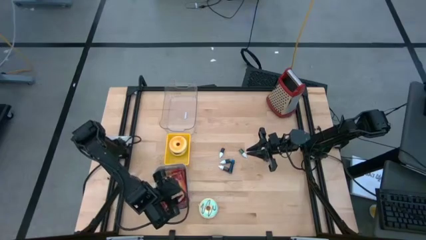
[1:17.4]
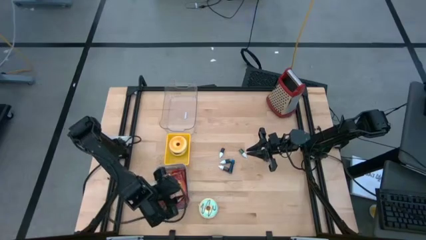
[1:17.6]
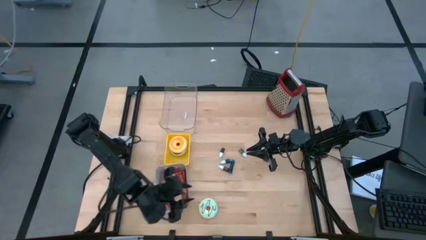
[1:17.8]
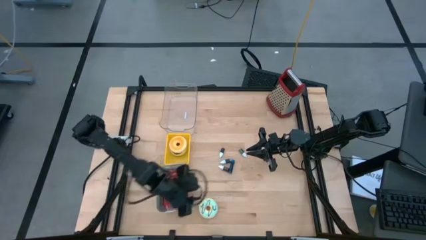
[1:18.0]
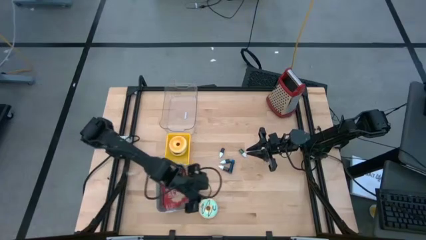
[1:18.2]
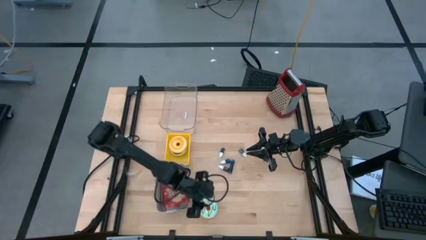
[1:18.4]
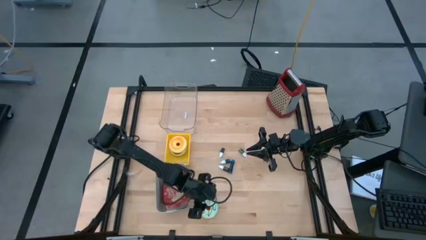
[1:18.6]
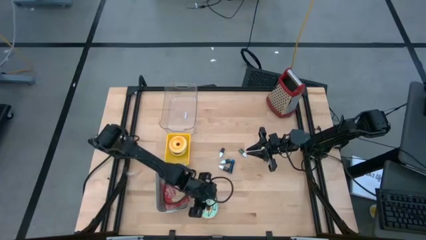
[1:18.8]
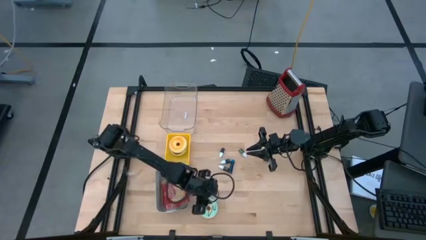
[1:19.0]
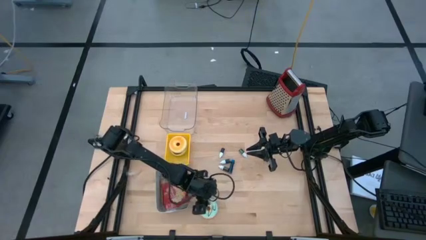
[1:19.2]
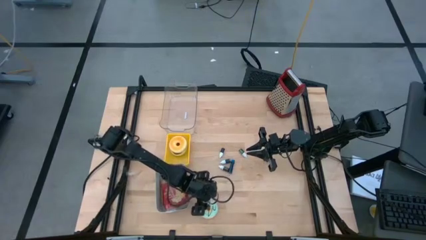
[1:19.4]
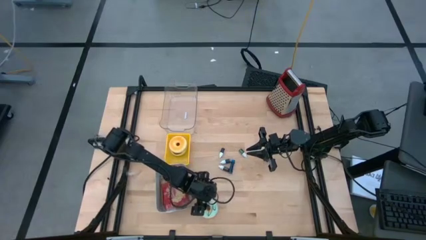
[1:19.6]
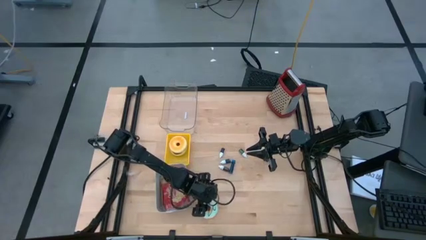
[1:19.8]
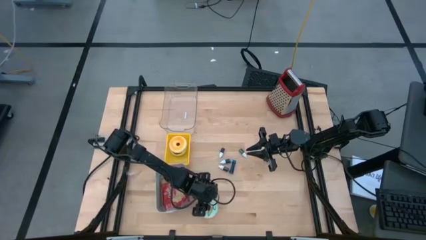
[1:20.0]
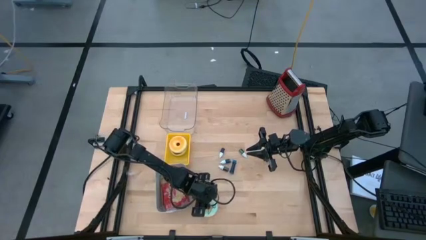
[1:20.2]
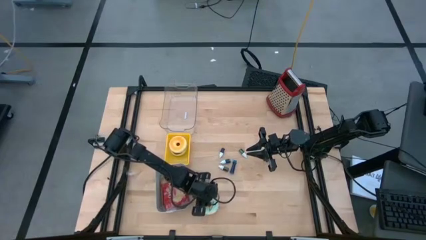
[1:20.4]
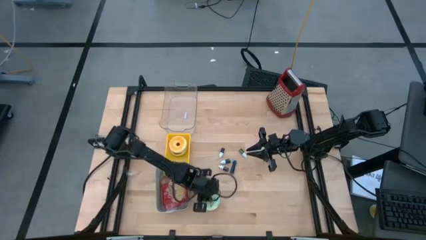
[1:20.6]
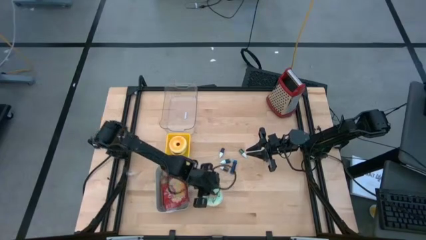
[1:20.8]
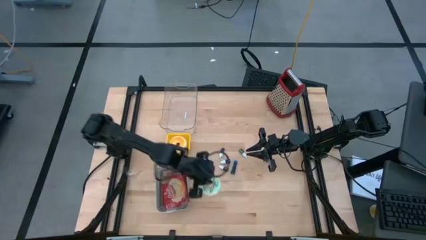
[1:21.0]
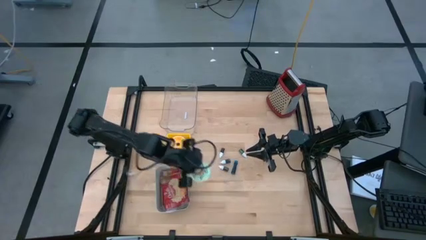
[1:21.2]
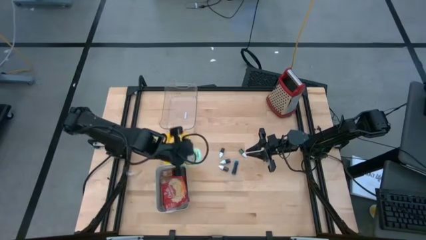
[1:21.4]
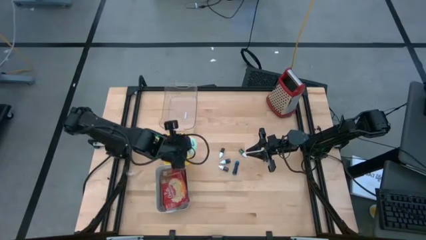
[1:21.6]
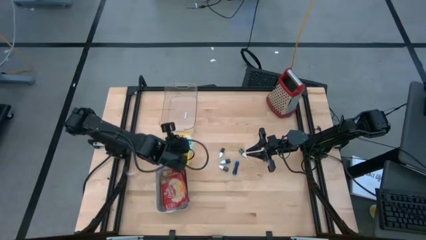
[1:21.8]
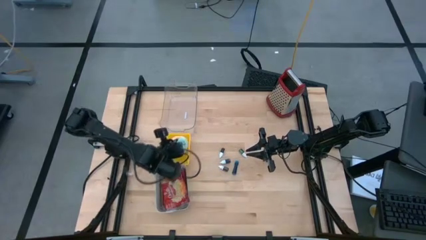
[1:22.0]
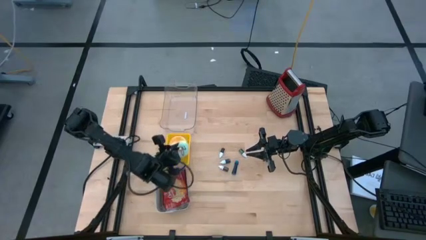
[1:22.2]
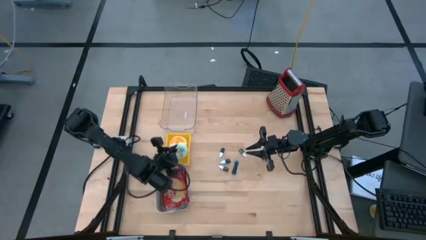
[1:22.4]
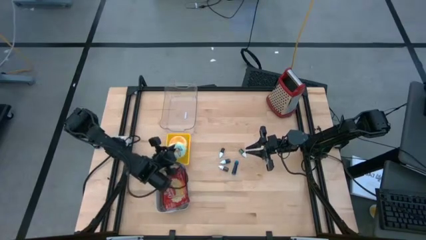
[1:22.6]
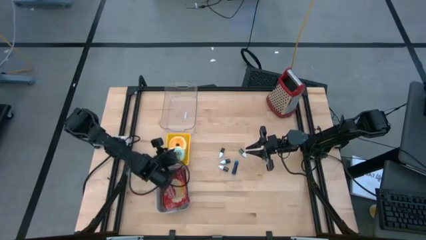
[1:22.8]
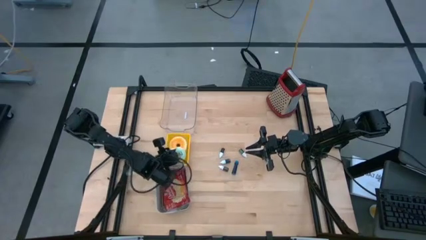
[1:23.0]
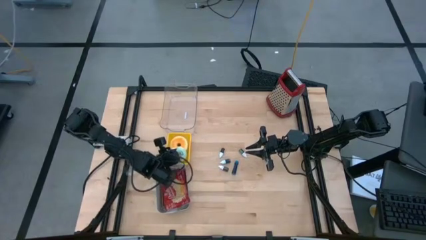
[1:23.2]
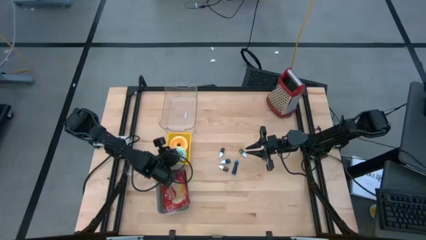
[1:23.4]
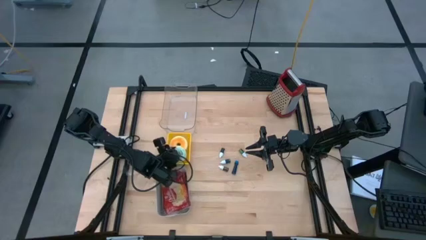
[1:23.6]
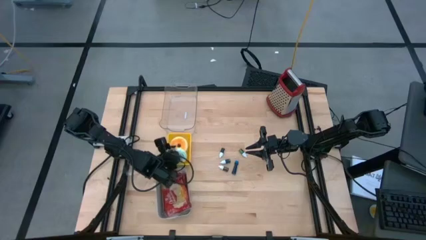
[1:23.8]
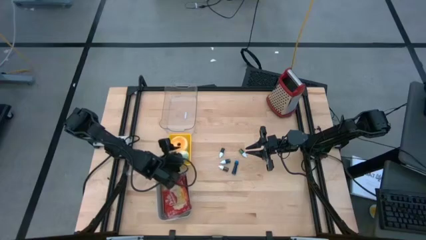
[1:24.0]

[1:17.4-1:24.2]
Task: Pick & Place Food Item
Put the light blue donut into the yellow bin

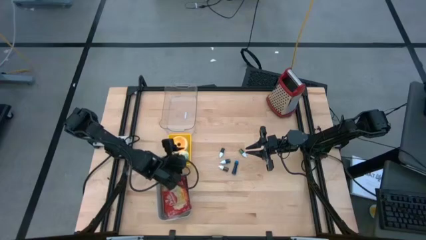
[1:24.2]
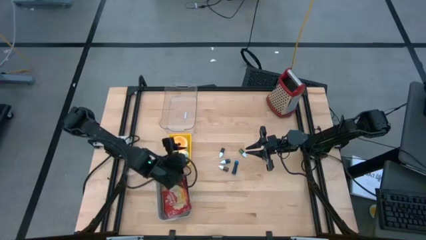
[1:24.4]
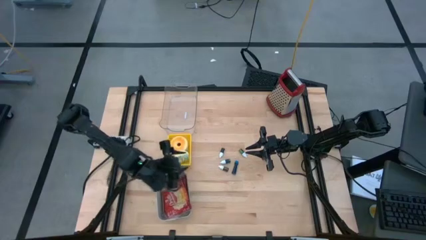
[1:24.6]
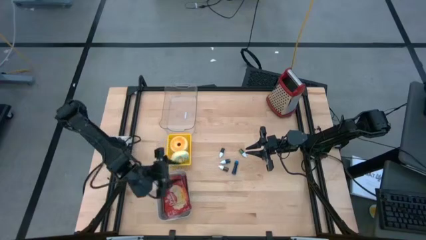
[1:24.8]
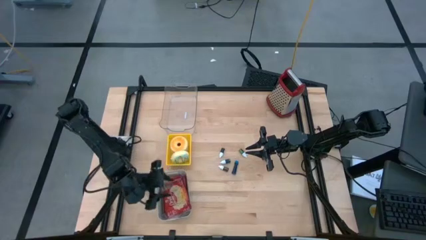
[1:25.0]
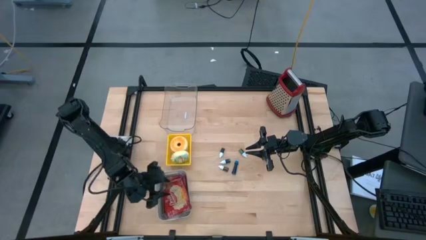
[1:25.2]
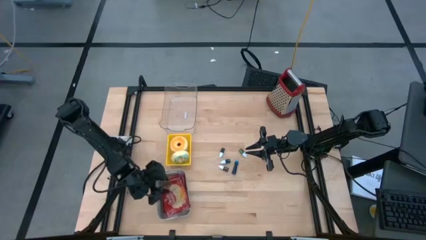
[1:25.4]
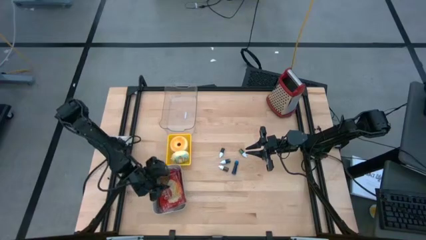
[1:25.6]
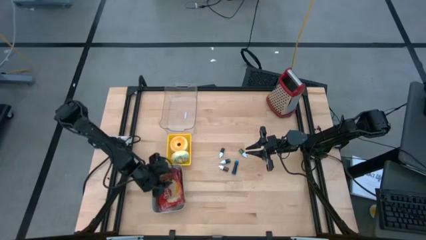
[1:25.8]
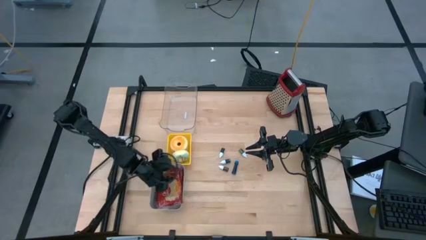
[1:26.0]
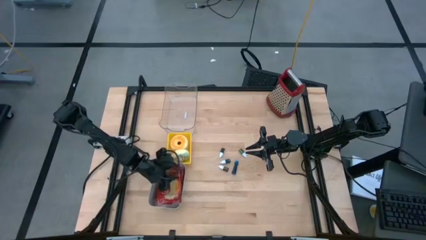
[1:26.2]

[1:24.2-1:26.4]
Adjust the white bin

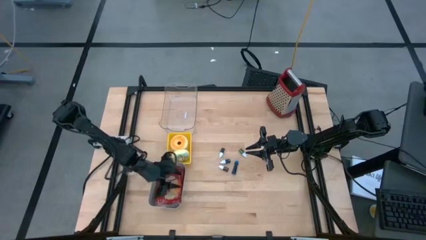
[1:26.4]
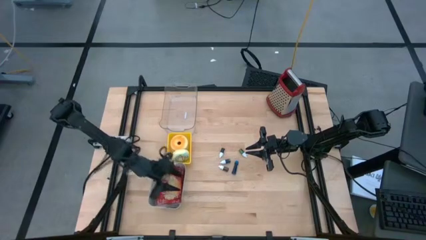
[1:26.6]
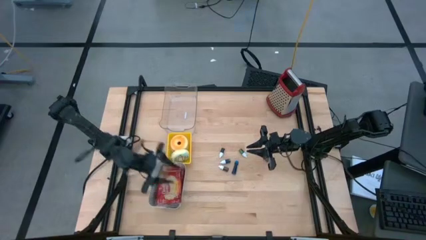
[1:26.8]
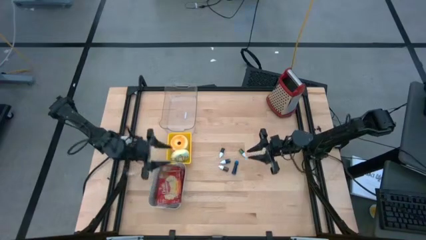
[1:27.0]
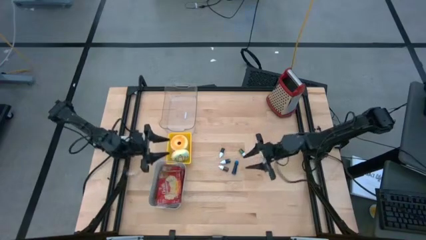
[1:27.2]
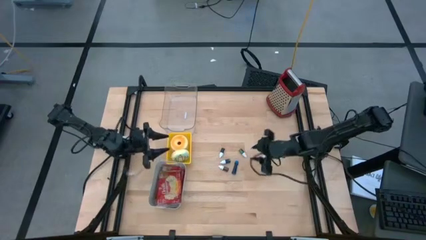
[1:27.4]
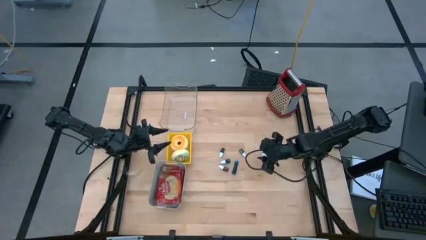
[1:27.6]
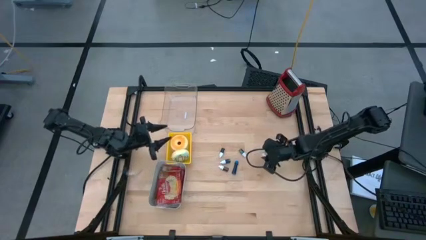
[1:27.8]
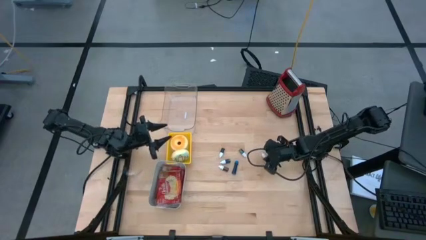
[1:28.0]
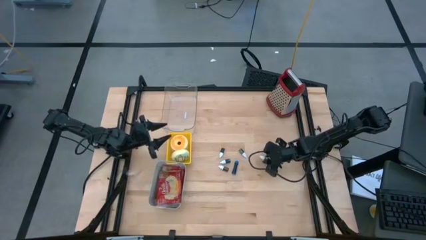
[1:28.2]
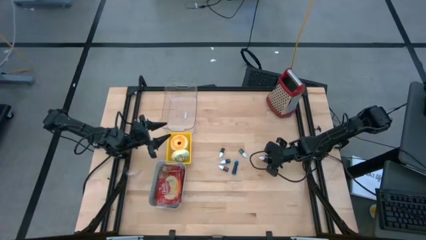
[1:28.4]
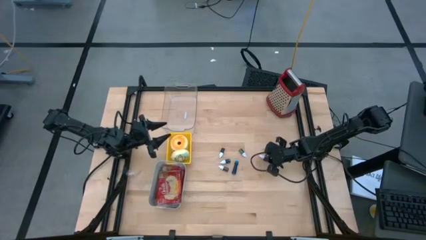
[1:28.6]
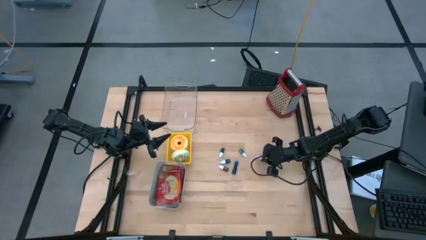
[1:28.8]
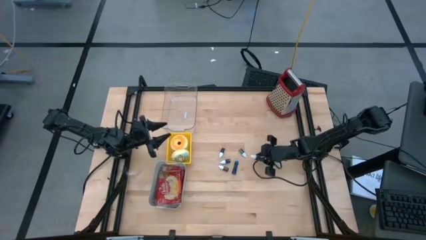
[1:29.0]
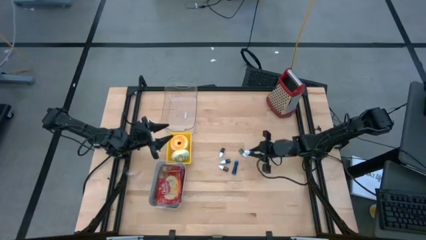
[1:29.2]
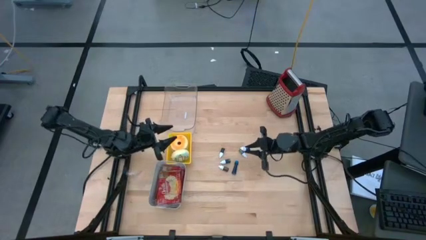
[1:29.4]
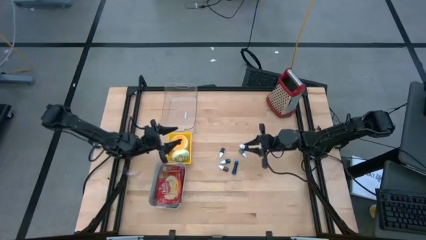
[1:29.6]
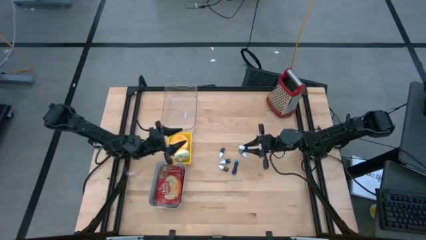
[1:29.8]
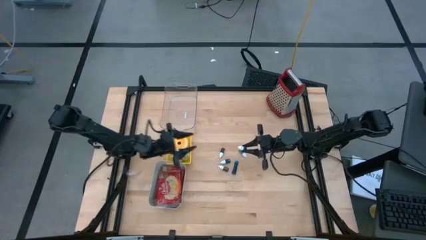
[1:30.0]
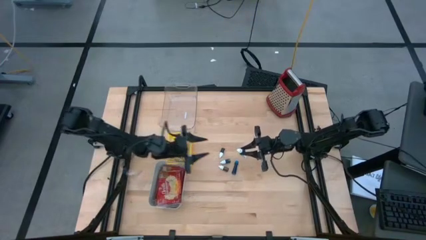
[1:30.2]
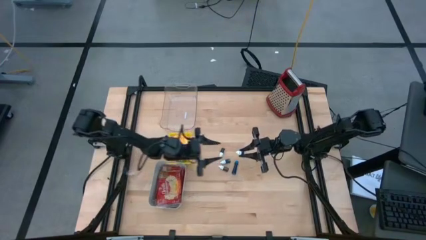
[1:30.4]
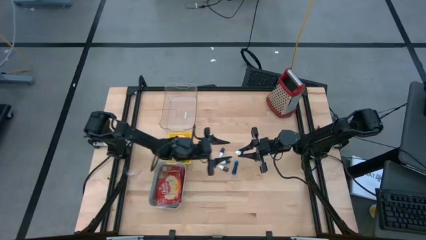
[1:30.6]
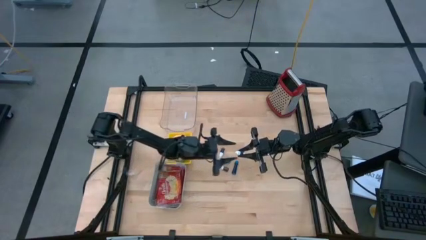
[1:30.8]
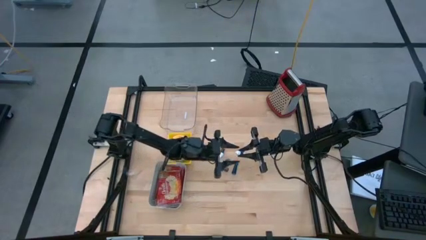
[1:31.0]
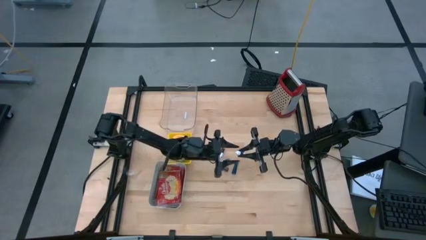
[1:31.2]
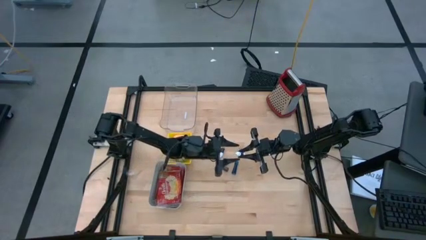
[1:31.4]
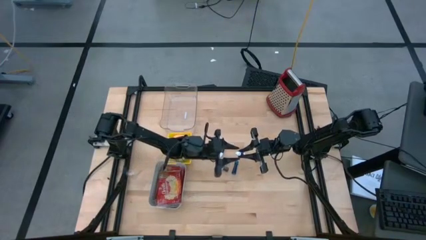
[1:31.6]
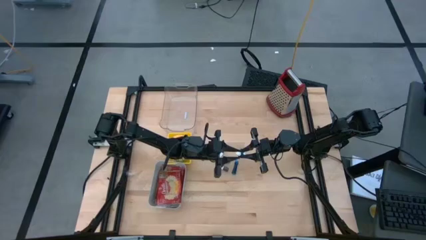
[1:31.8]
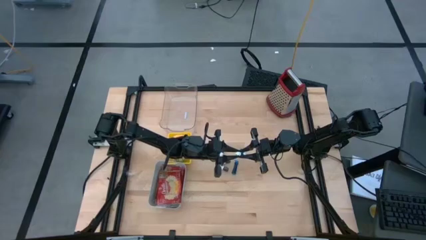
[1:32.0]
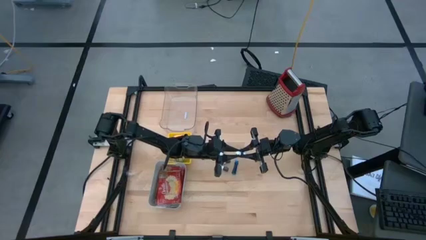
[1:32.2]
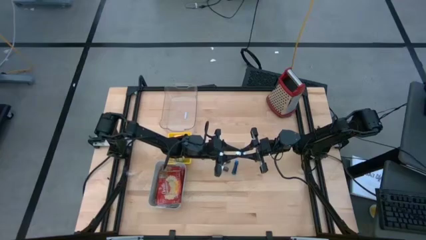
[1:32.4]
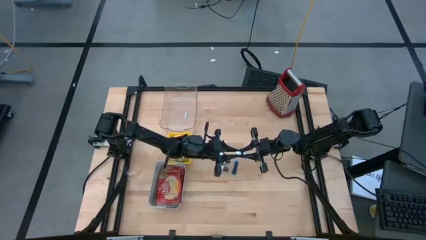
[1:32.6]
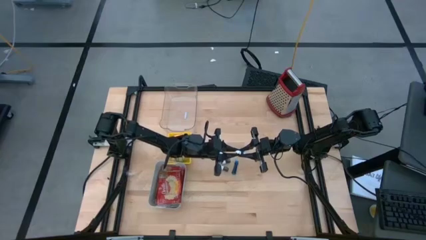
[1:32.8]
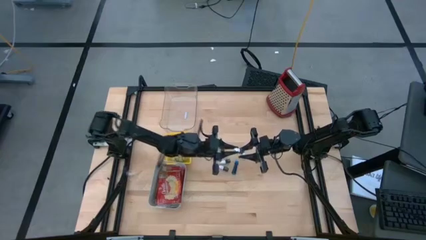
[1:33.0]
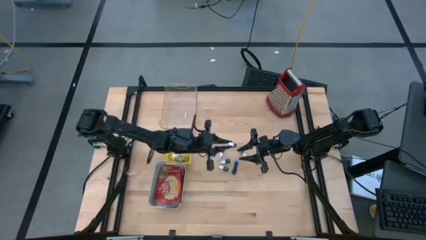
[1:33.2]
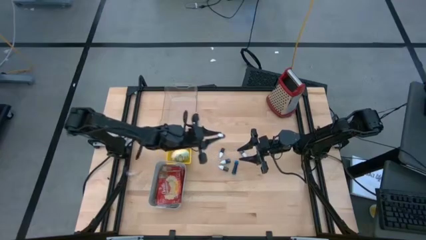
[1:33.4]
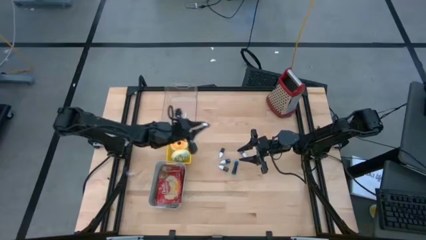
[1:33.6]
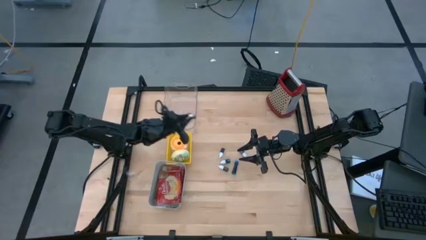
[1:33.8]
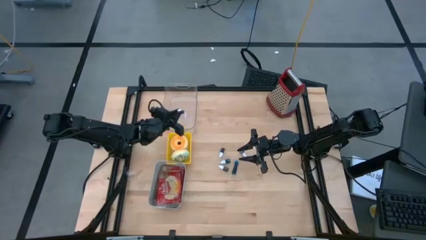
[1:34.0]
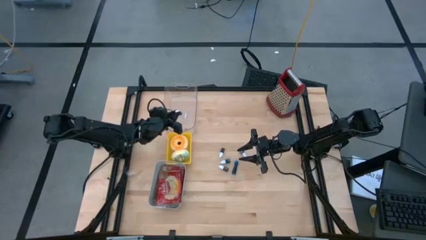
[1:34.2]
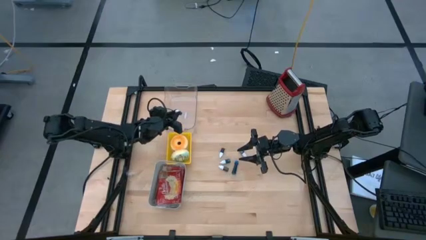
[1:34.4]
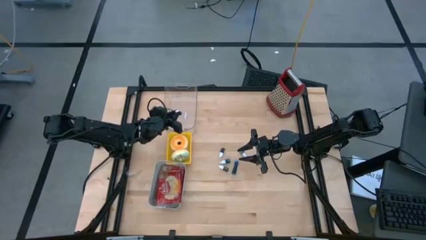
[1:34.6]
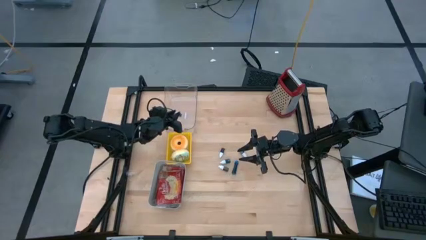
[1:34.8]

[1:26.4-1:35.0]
Put the purple food coloring bottle into the transparent bin
